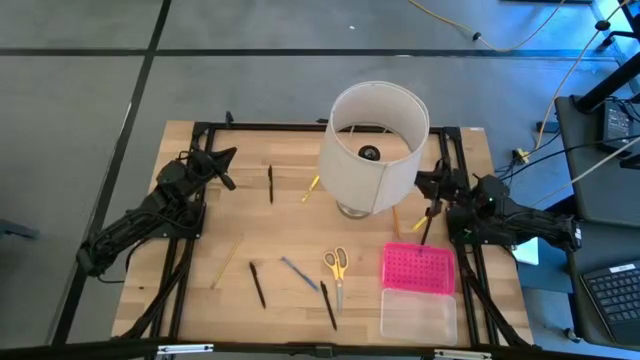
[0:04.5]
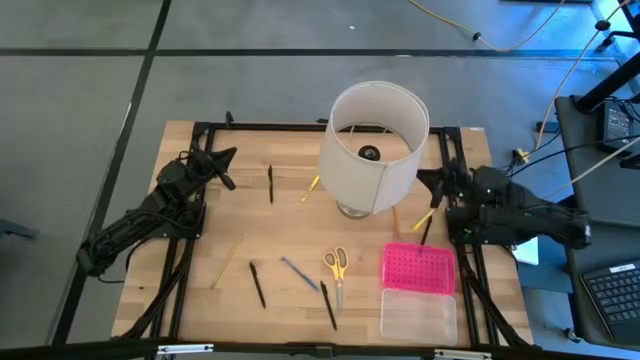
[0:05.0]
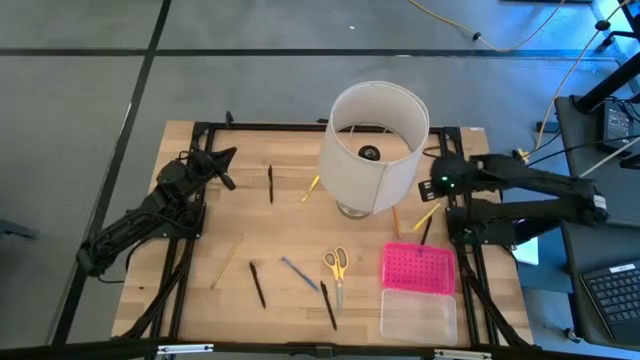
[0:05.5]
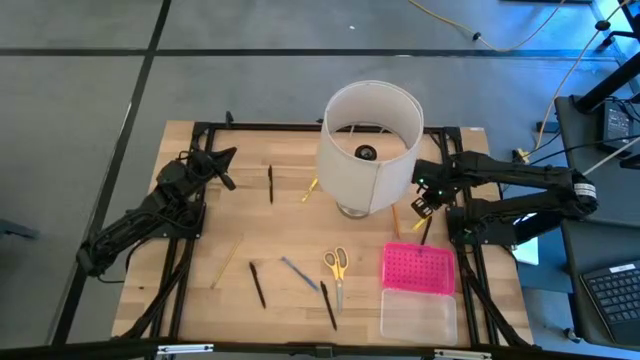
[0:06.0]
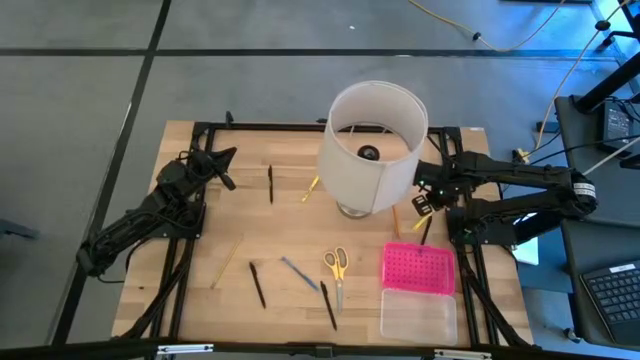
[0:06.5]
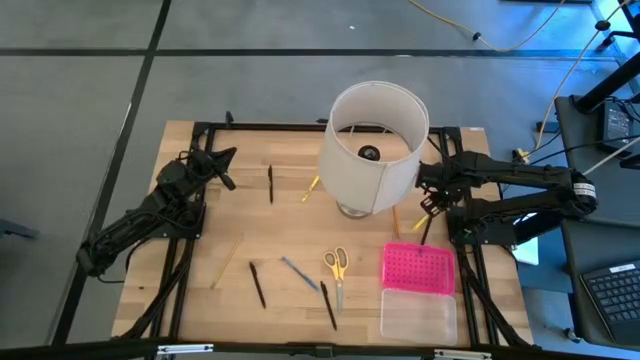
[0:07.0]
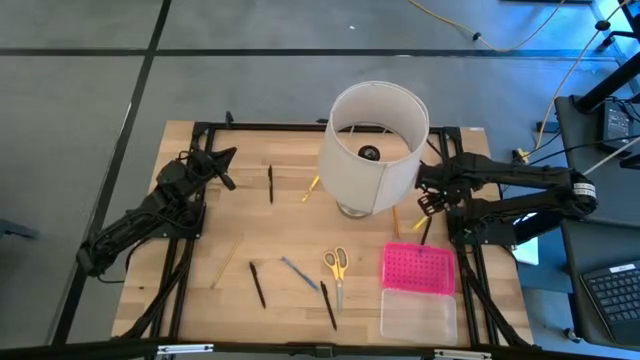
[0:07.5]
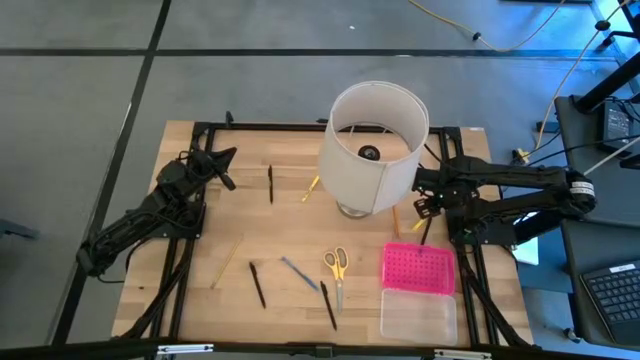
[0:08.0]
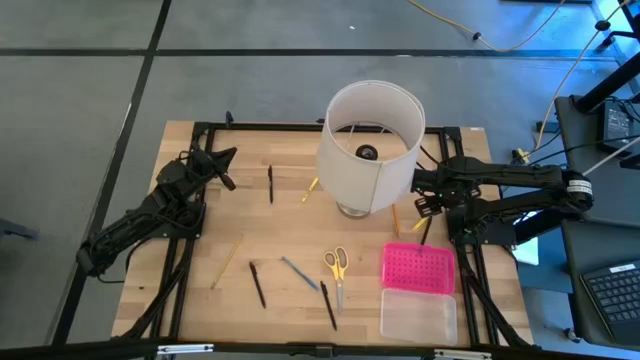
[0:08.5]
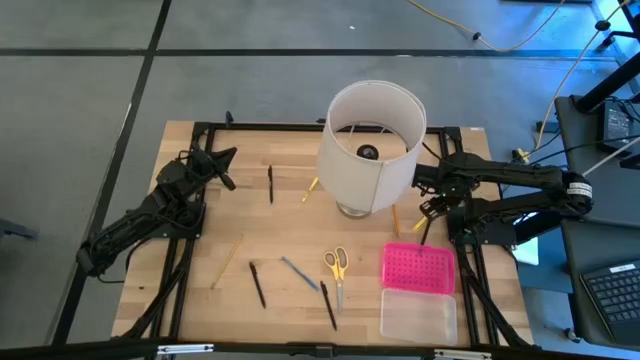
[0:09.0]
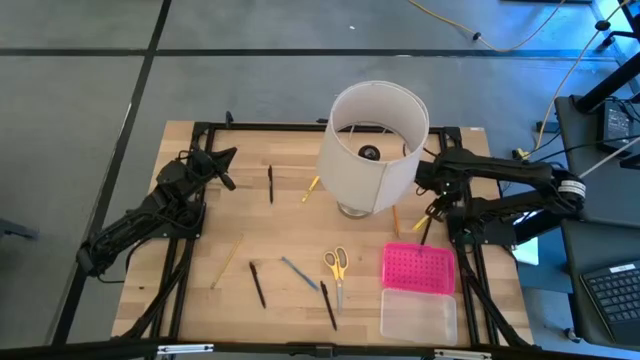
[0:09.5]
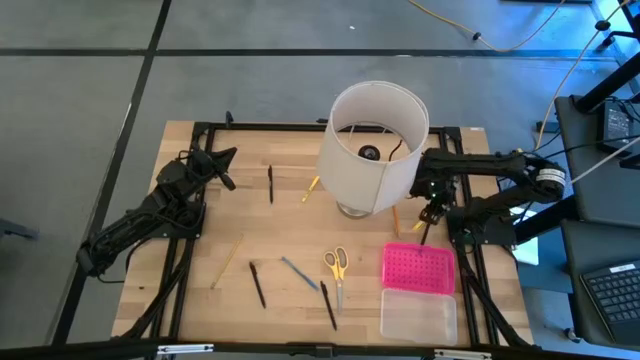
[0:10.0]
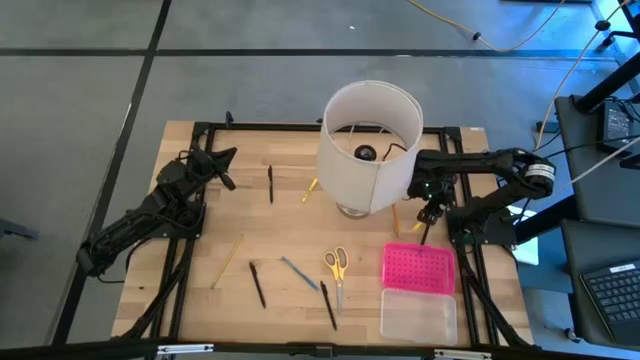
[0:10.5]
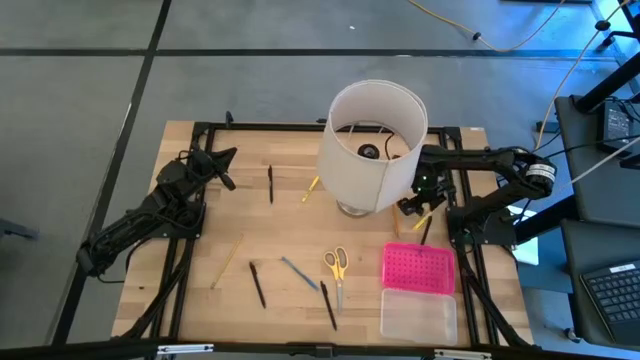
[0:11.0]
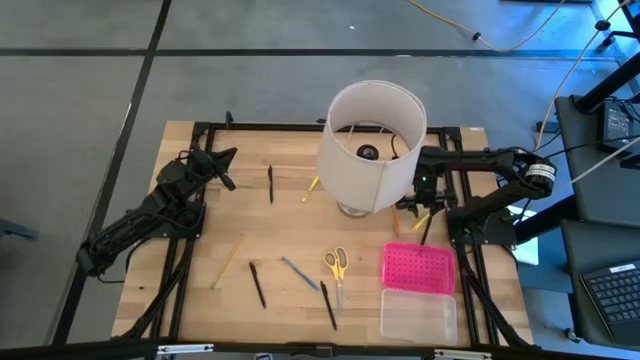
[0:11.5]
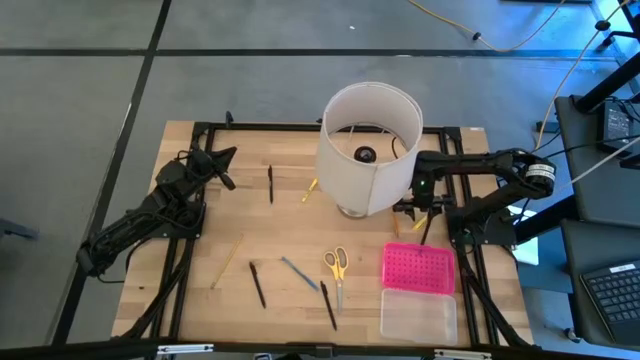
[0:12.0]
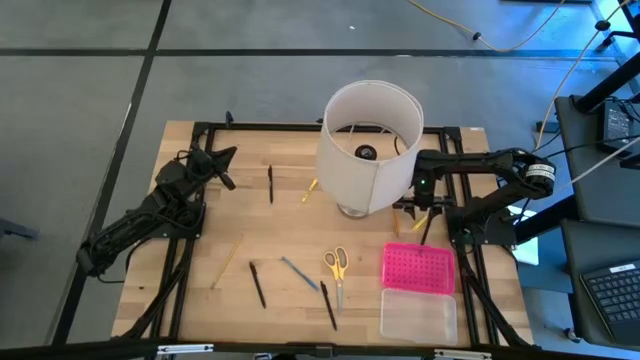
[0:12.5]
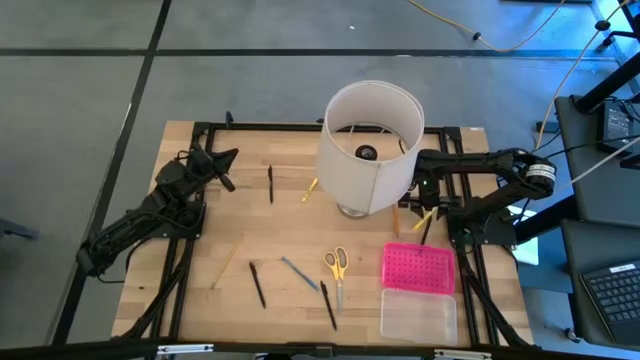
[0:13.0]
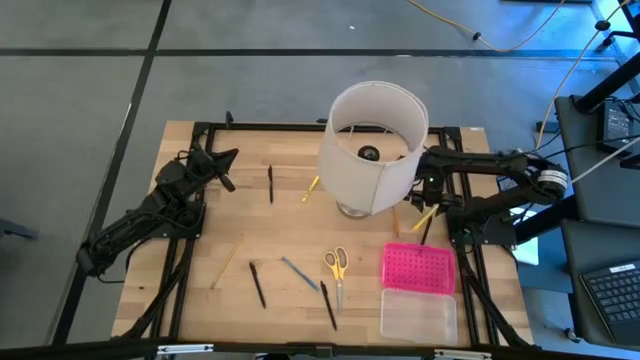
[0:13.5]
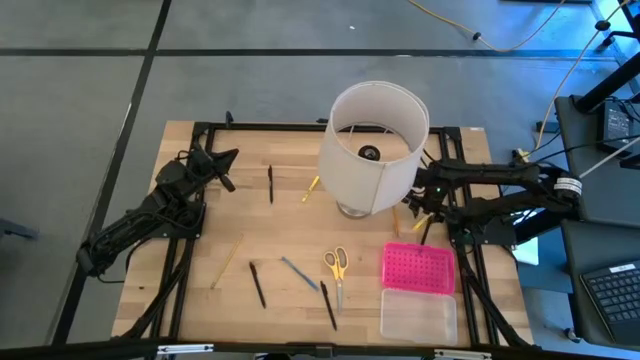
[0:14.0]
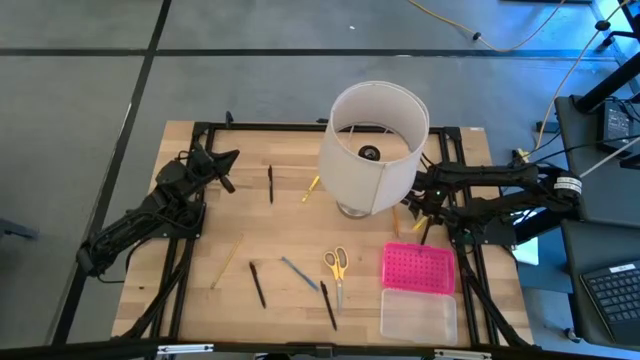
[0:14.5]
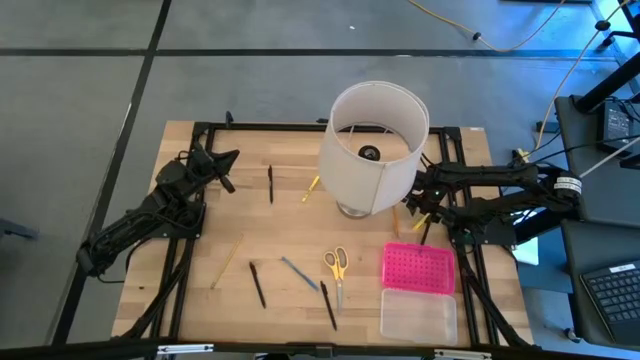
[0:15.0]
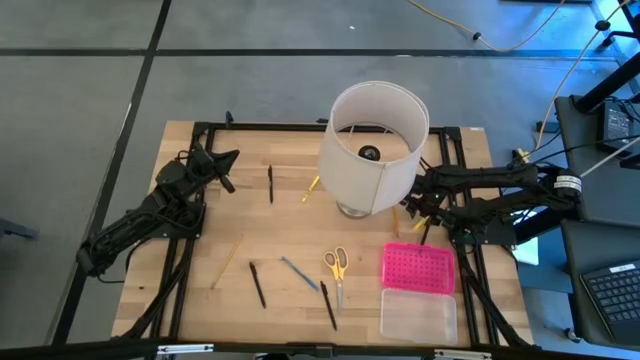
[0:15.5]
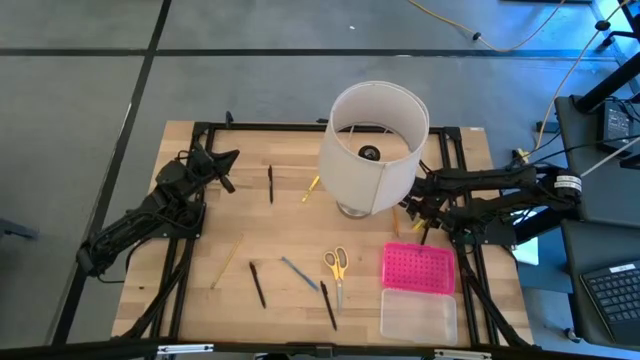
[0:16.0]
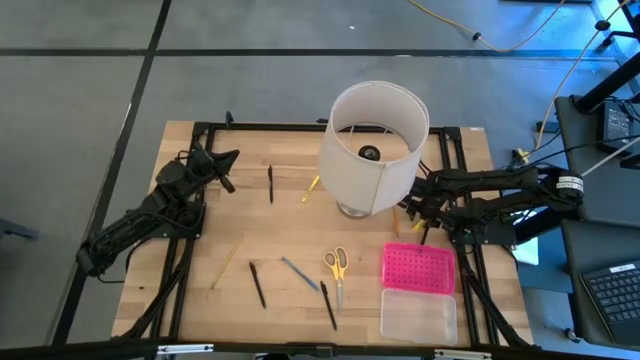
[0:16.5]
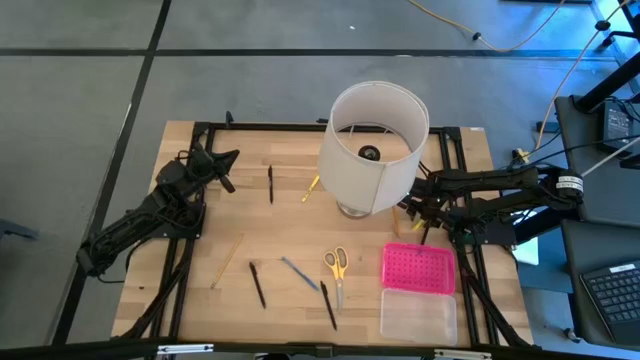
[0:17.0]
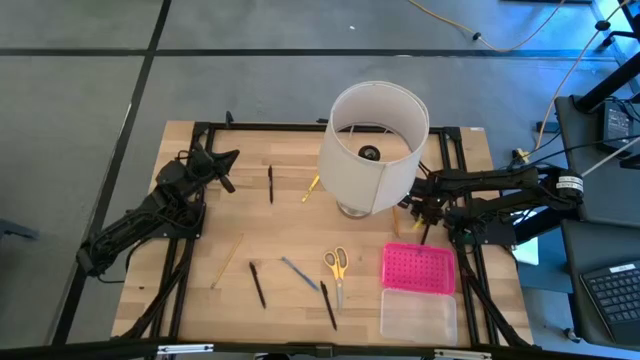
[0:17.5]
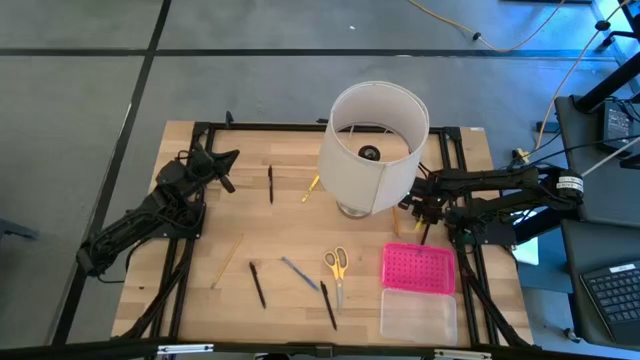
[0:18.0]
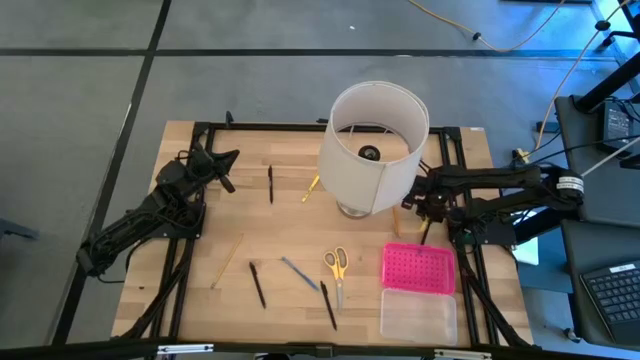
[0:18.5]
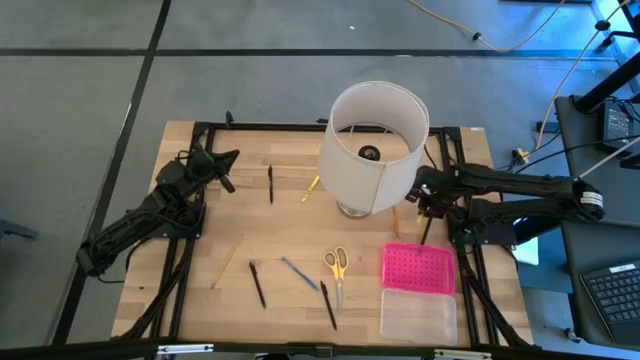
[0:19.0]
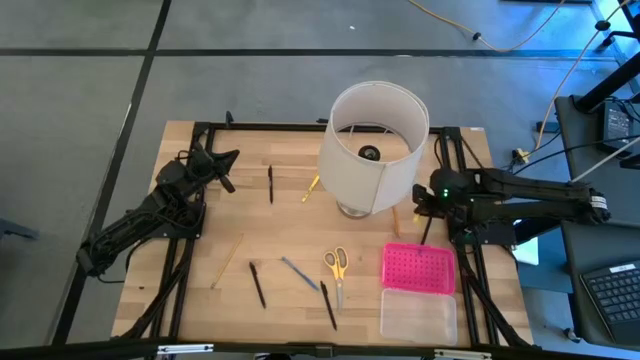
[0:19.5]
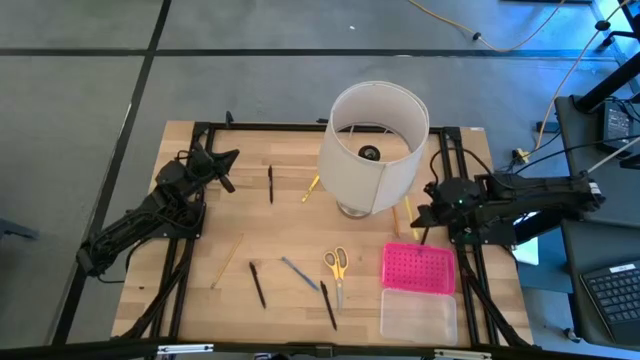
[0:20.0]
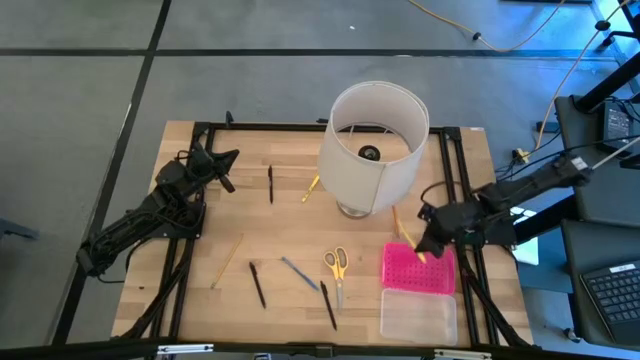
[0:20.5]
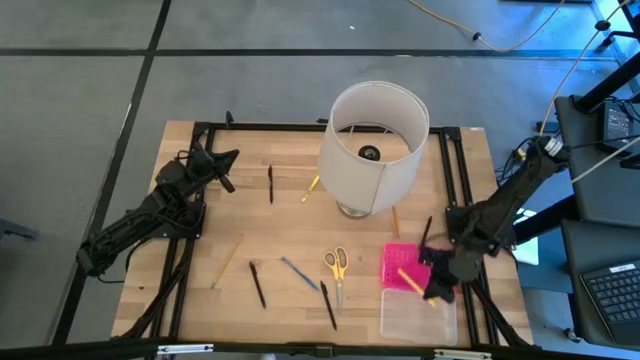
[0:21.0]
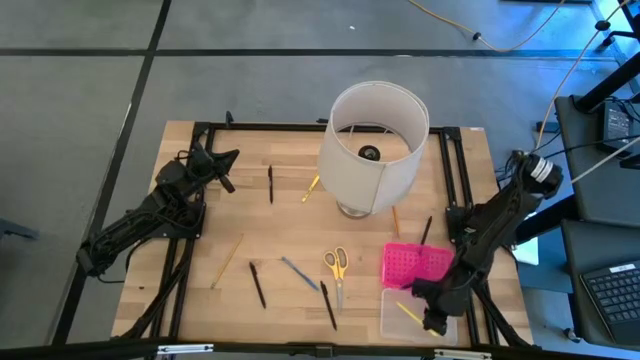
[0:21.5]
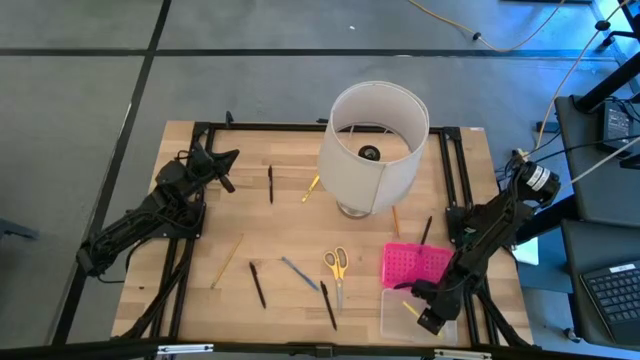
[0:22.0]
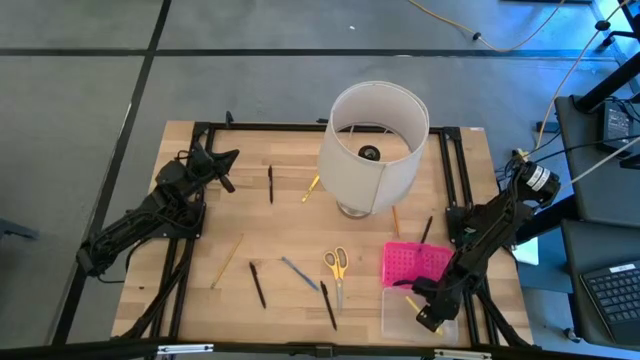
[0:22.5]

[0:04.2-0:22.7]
Task: Pick & place school supplies into a supply box
Put the yellow pen into the supply box
